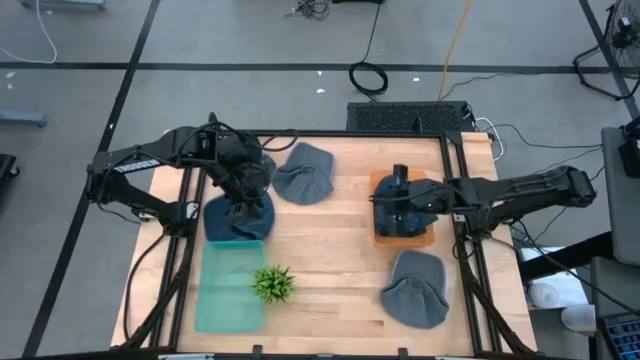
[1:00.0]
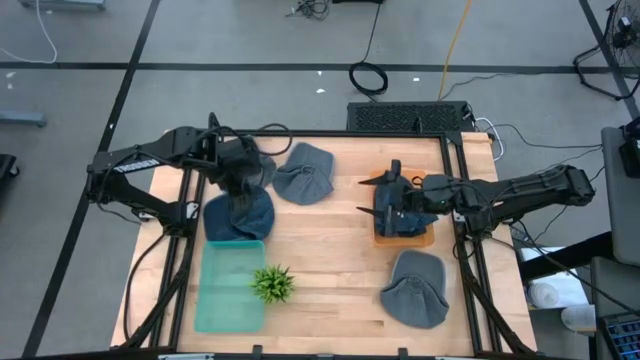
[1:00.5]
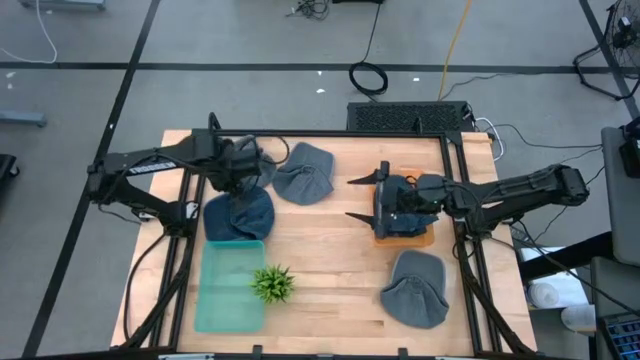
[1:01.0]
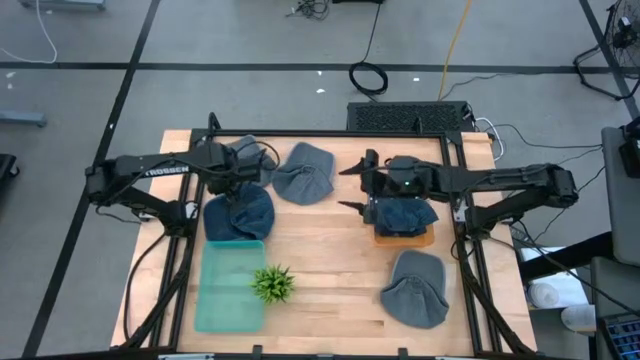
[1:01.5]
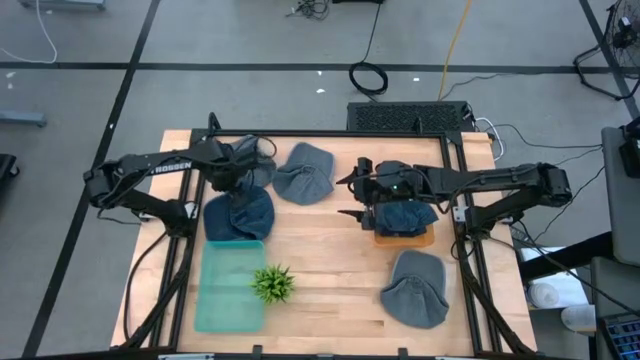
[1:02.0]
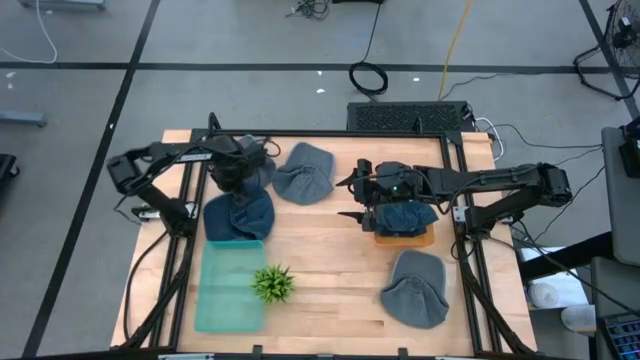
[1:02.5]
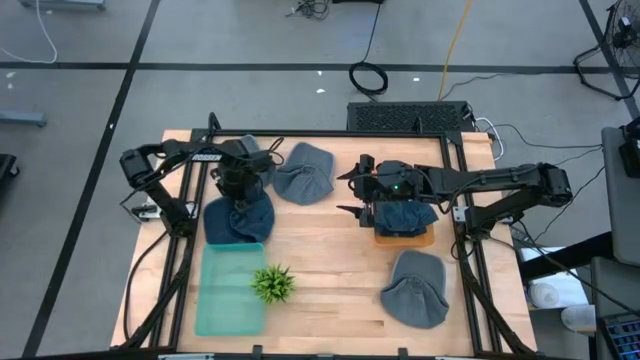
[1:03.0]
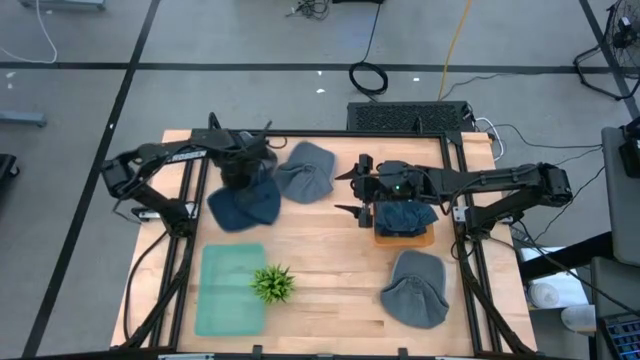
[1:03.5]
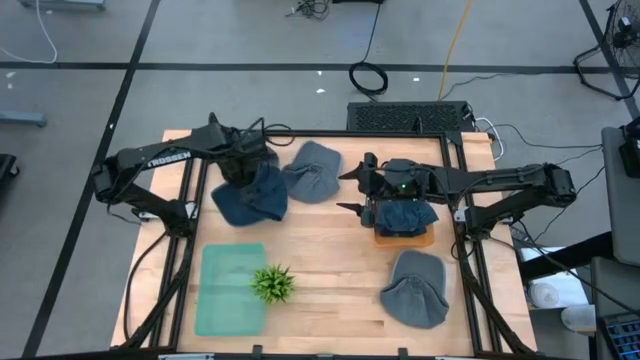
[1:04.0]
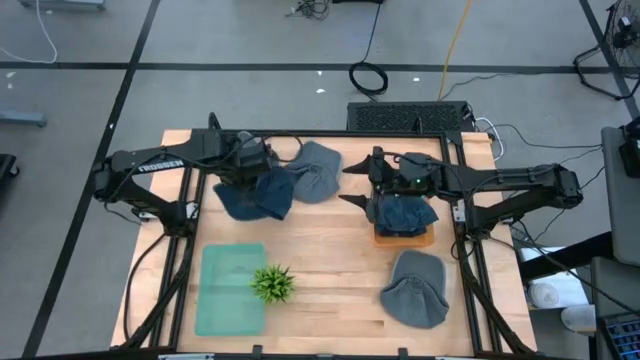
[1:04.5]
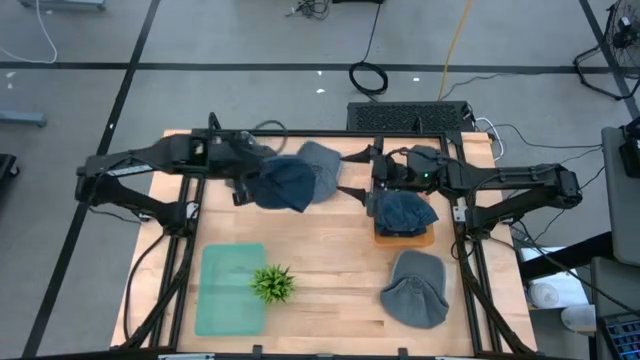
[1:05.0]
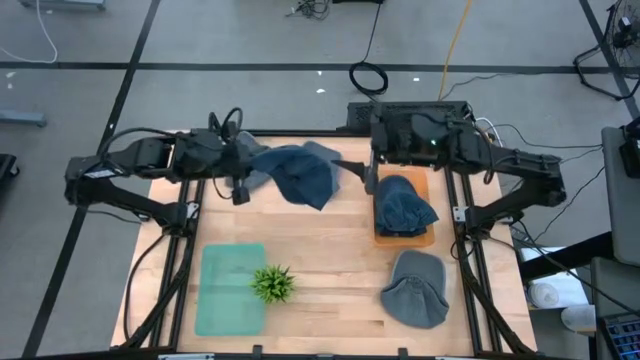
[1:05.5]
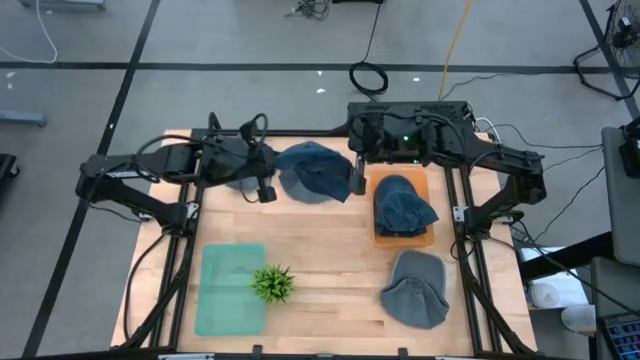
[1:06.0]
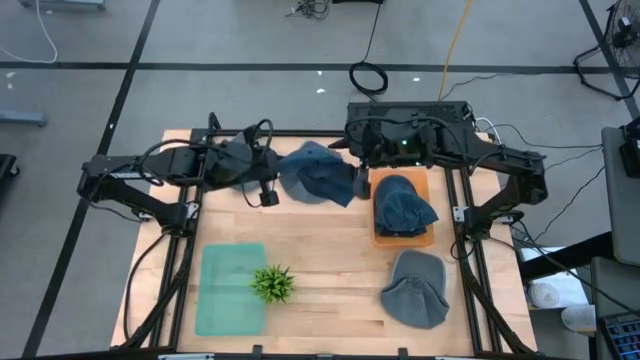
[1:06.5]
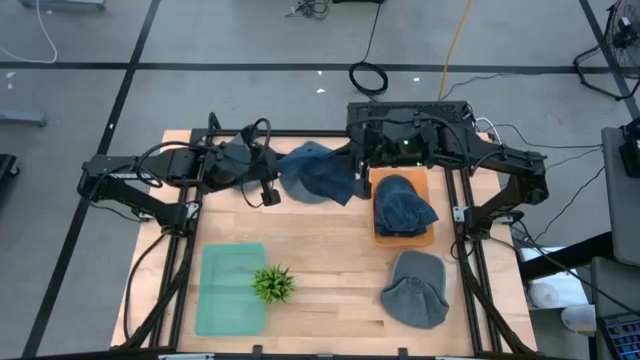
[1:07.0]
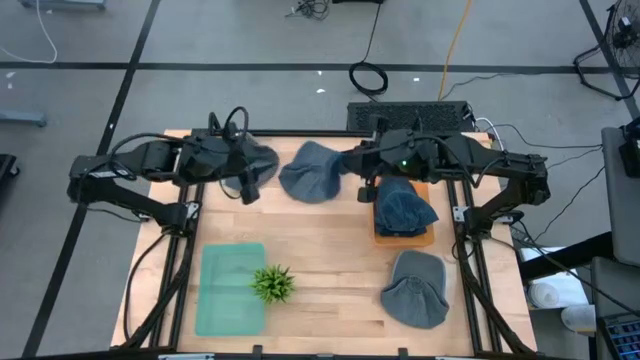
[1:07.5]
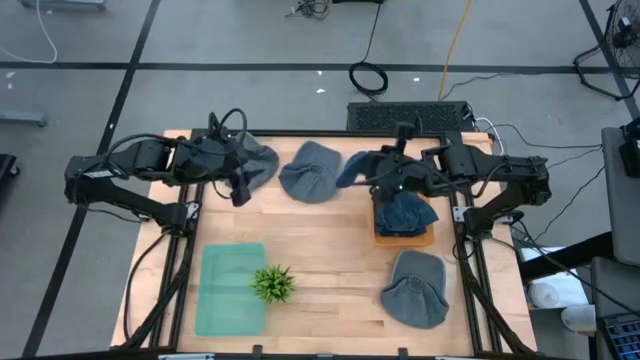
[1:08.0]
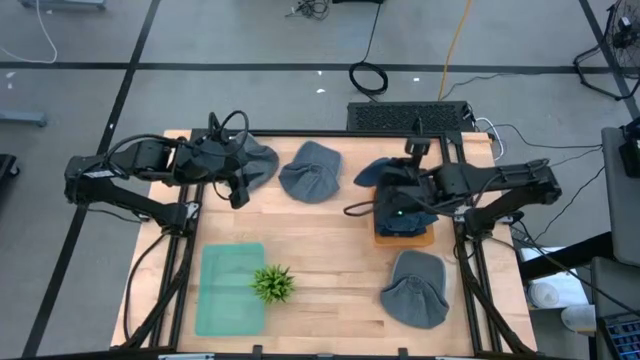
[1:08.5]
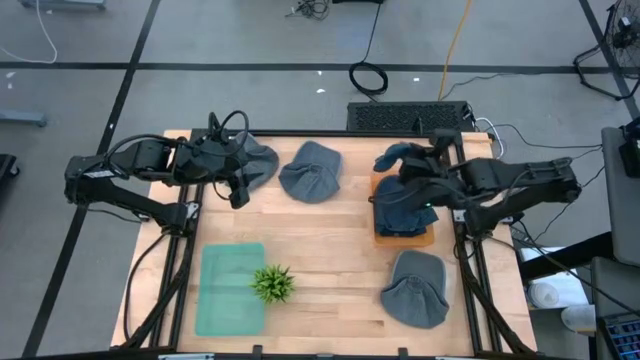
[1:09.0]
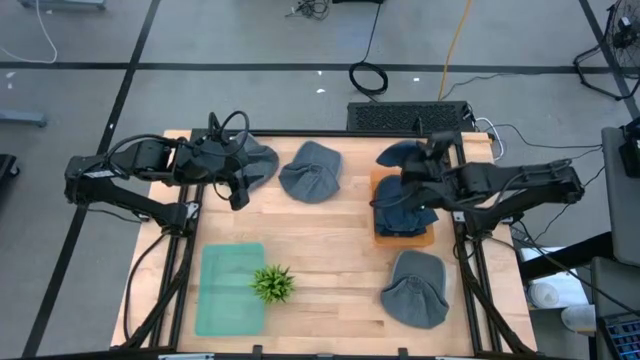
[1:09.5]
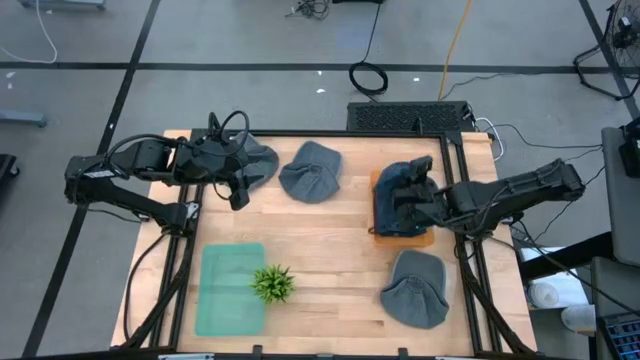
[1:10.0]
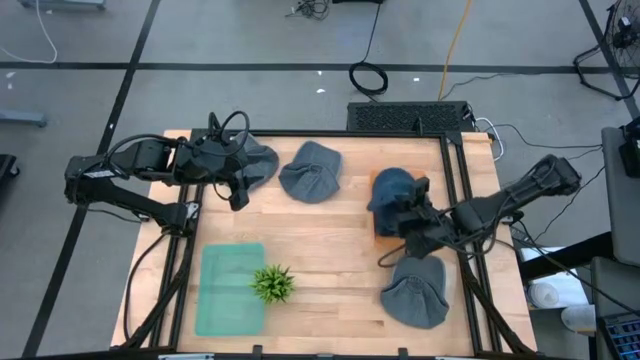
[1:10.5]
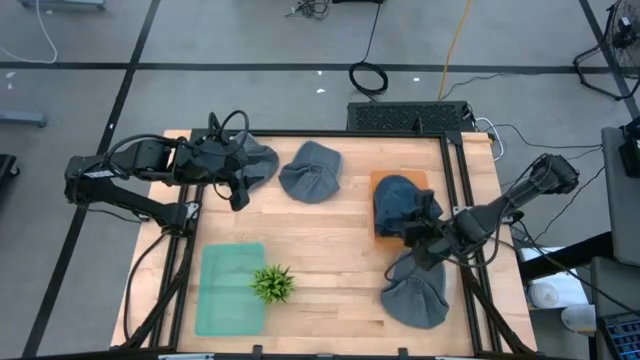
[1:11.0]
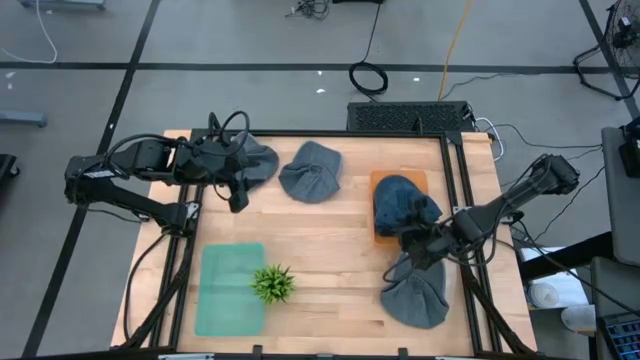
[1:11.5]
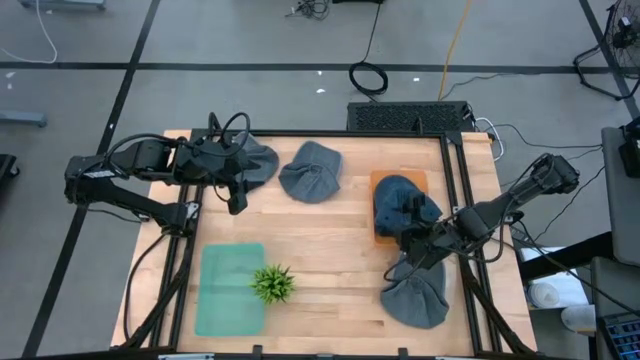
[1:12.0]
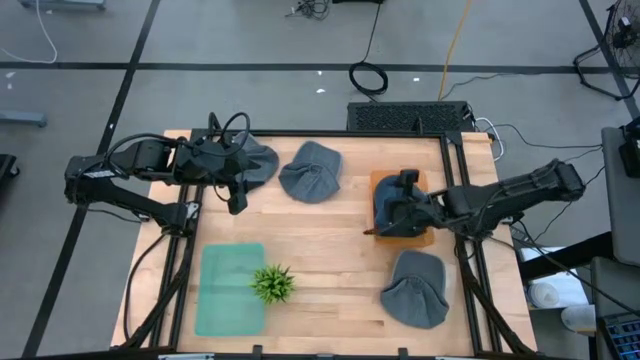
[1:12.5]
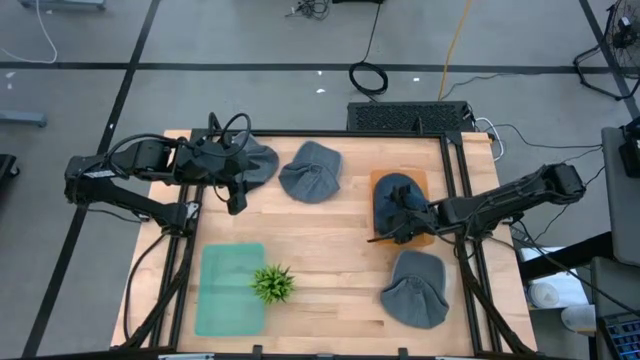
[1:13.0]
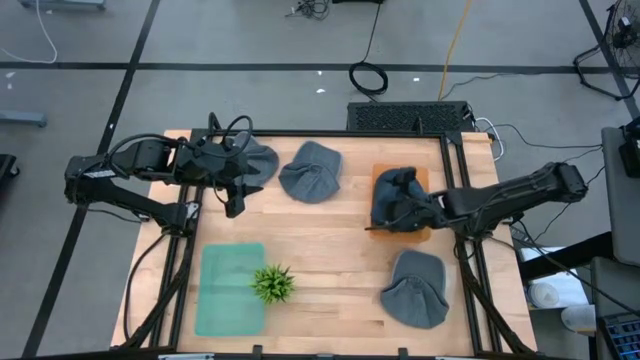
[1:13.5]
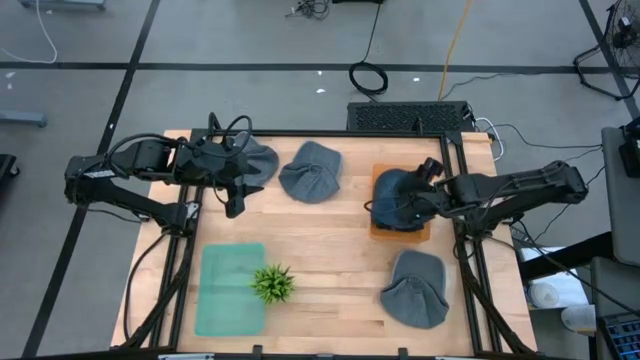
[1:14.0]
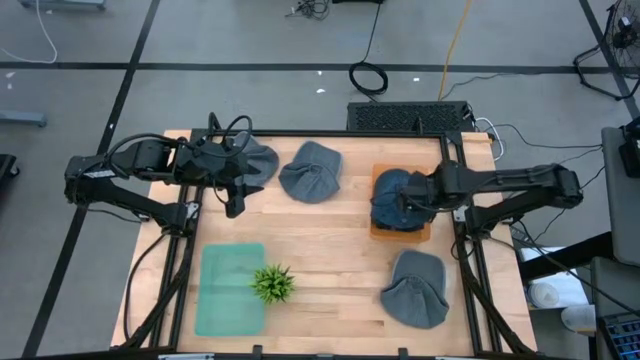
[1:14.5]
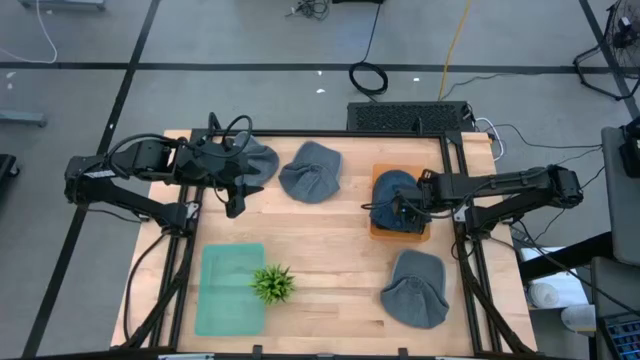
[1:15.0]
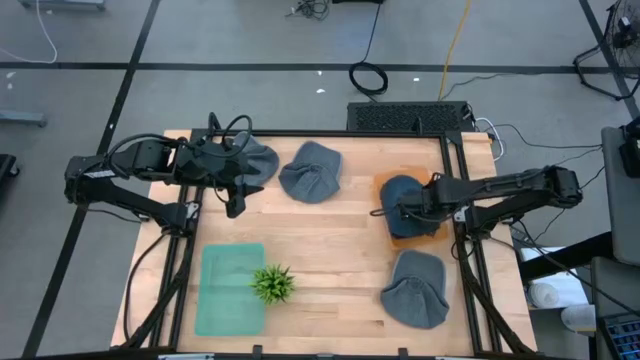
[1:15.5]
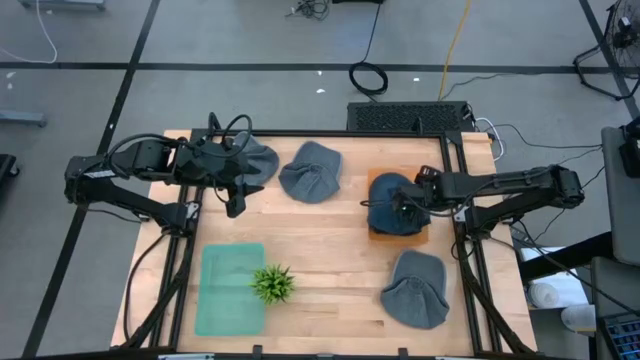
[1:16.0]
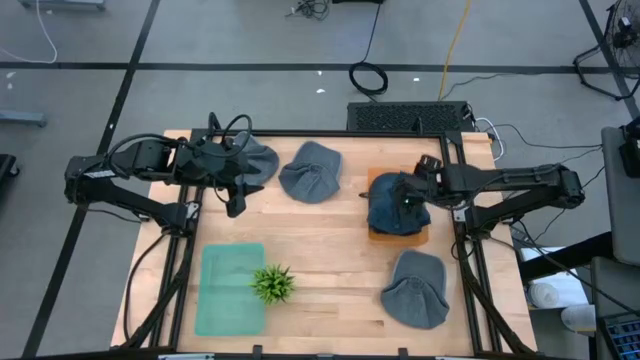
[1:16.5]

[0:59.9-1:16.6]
Task: Pick & Place hat
Put the blue cap into the orange bin

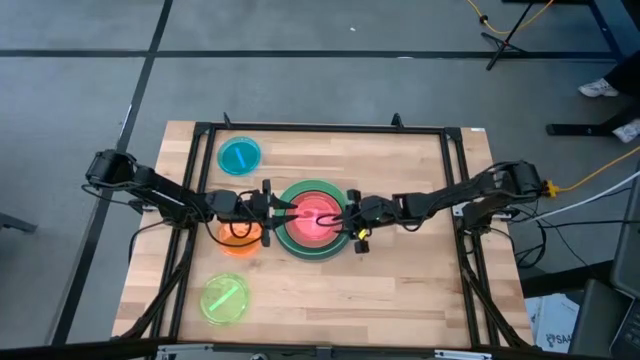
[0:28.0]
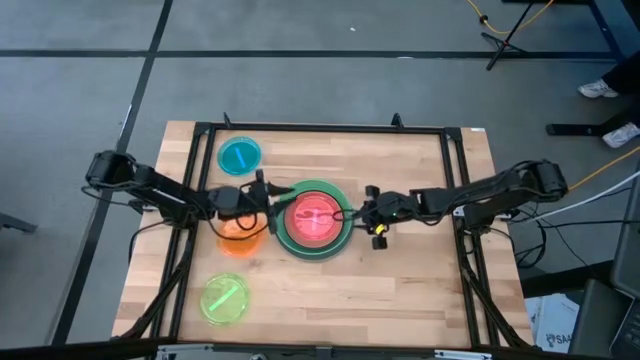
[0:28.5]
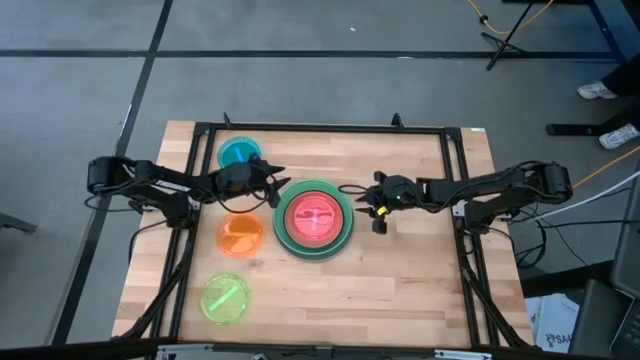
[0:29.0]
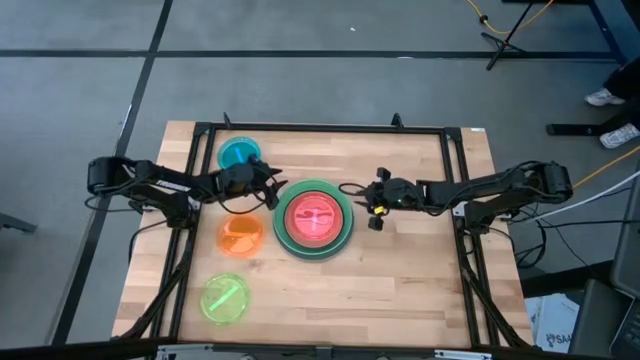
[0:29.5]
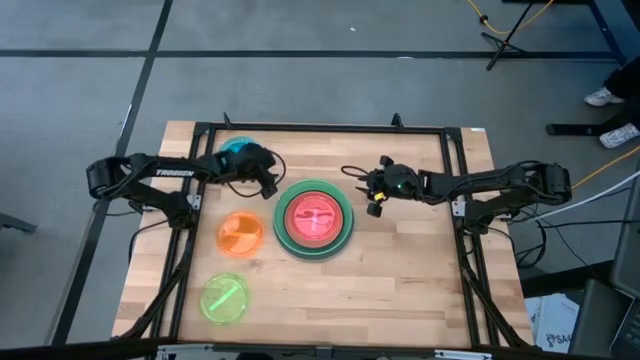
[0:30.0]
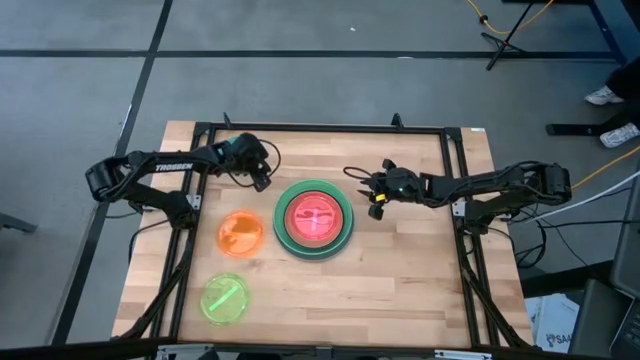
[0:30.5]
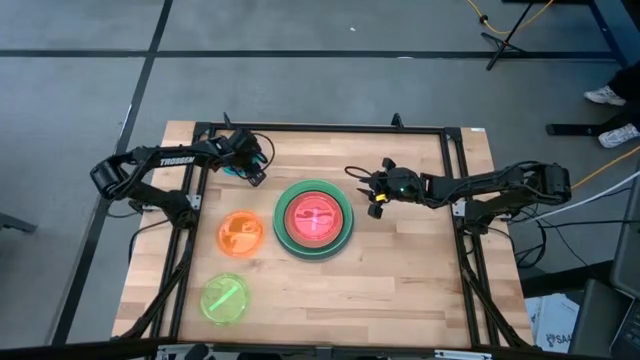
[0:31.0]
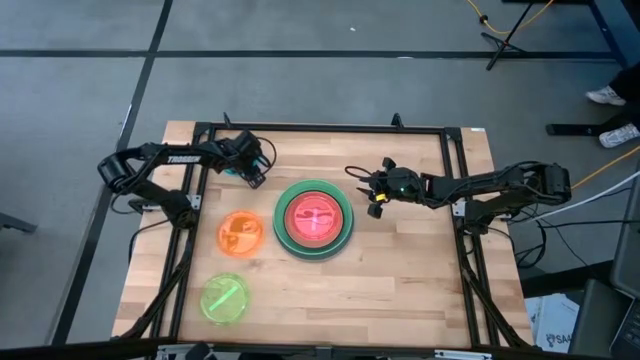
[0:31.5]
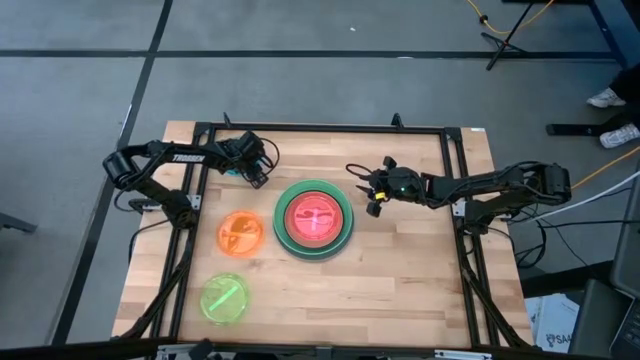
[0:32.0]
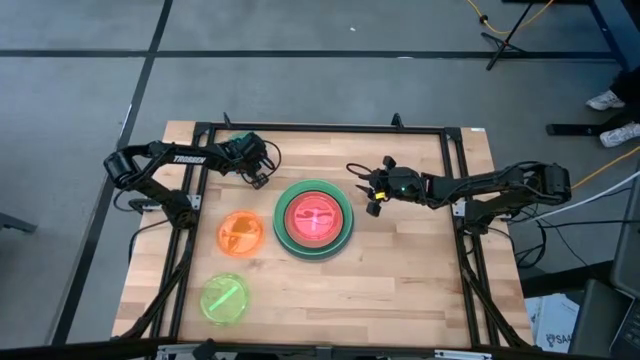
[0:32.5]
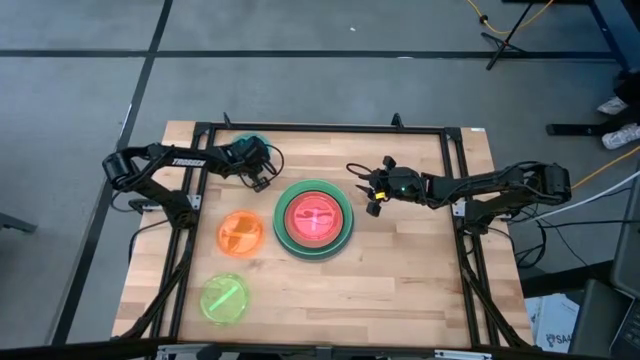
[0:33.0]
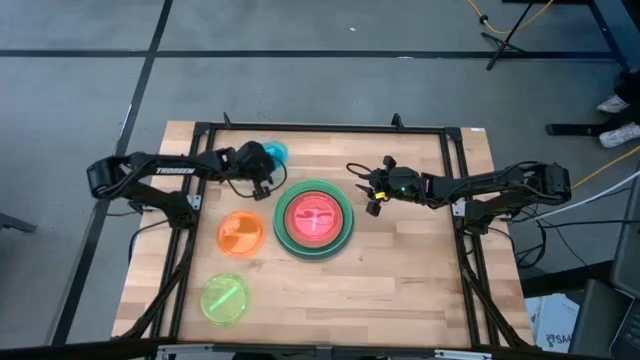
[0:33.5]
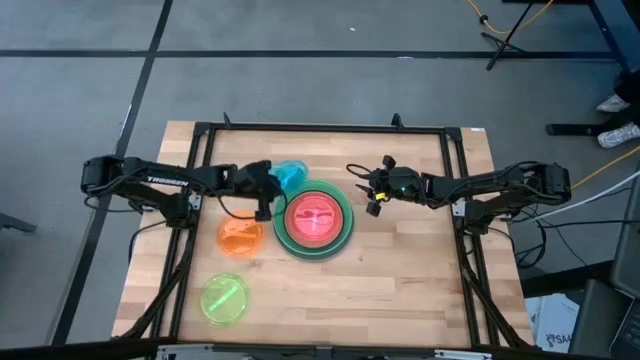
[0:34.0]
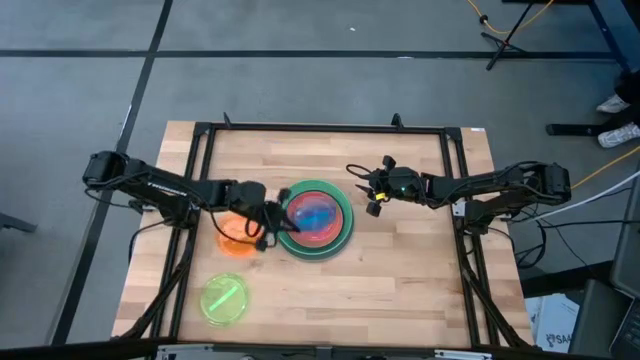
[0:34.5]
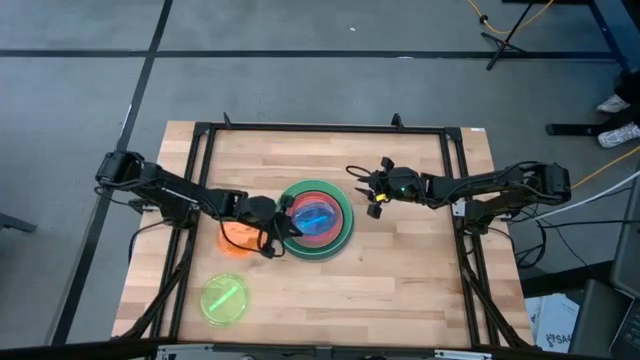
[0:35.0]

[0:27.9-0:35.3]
Task: Stack plastic plates
Stack the blue plate on top of the pink plate
